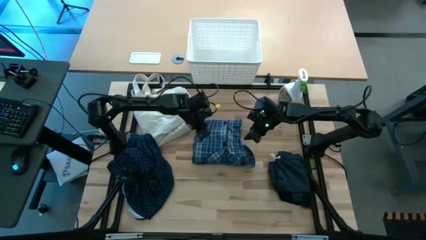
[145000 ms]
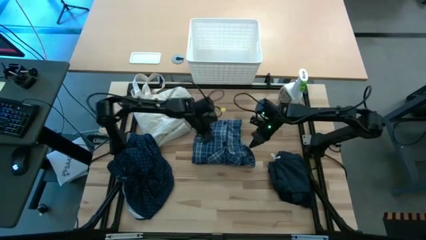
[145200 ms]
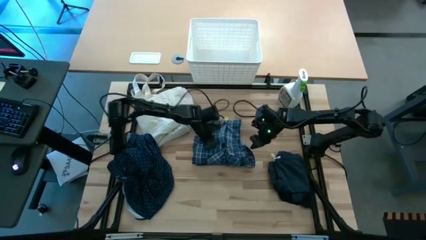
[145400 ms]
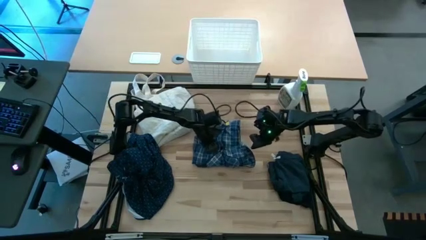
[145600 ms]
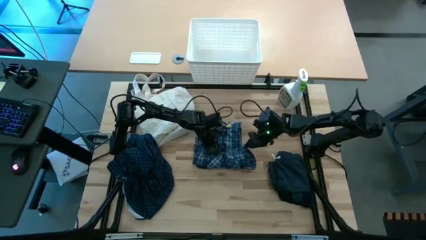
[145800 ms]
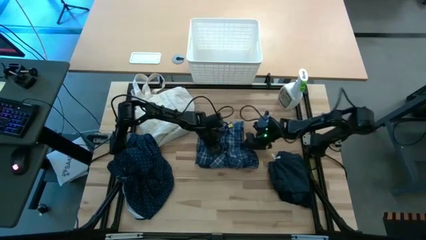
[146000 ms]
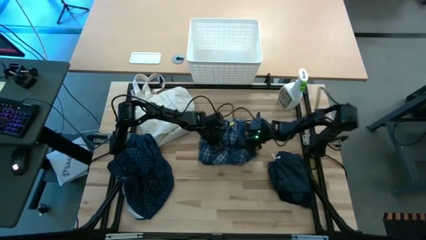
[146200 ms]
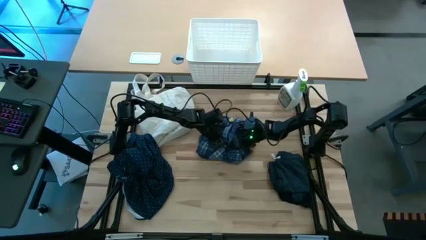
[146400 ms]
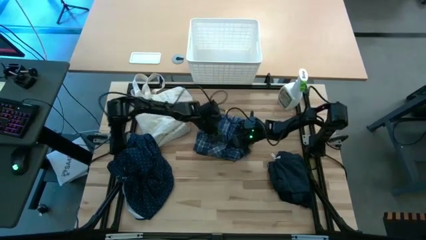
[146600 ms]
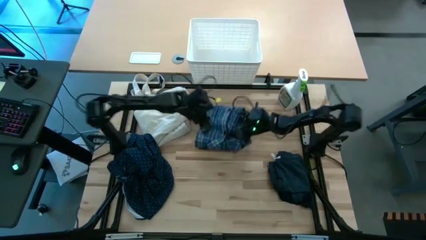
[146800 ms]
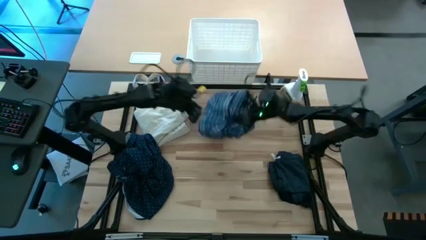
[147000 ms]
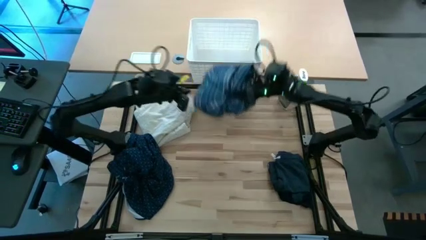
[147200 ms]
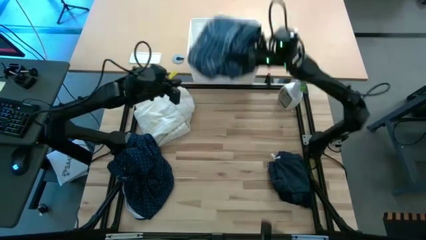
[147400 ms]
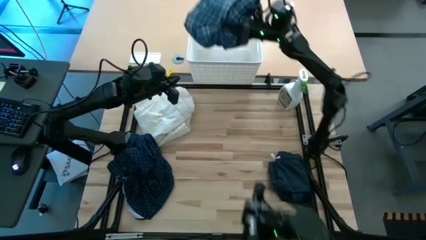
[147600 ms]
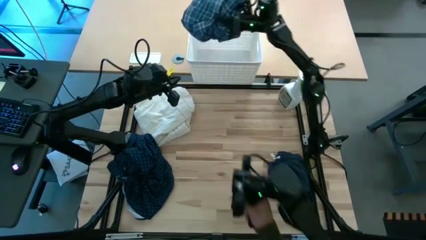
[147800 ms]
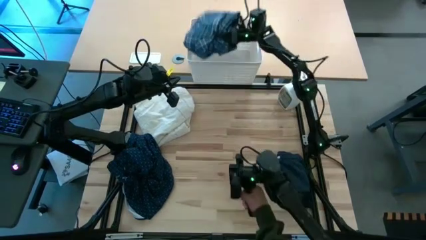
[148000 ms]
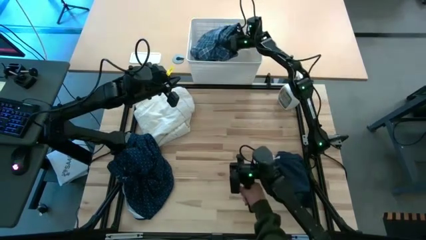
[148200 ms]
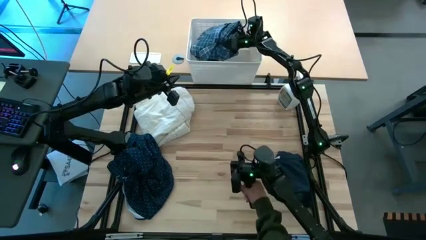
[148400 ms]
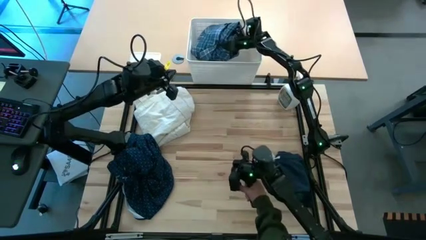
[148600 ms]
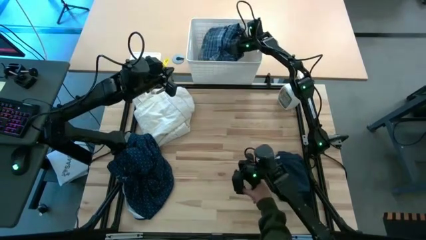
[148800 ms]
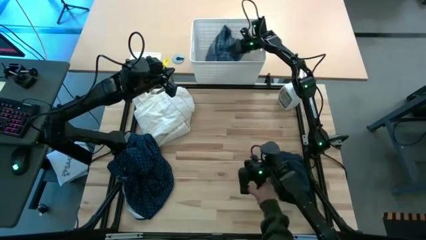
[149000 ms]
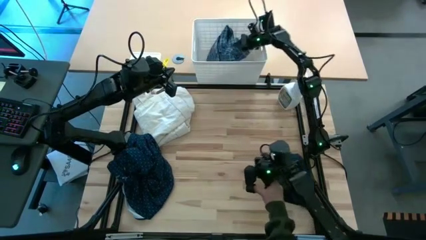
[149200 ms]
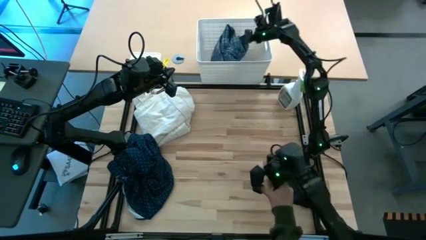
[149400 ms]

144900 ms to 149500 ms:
Put the folded blue checkered long sleeve into the white bin
